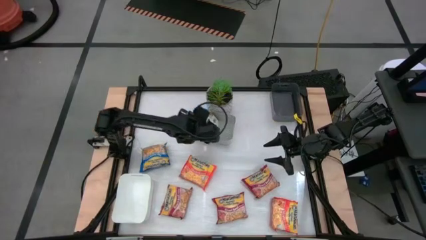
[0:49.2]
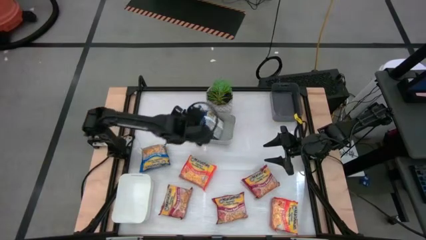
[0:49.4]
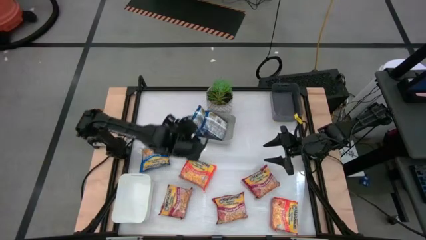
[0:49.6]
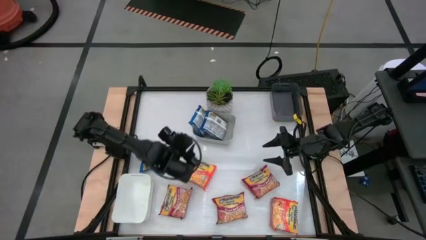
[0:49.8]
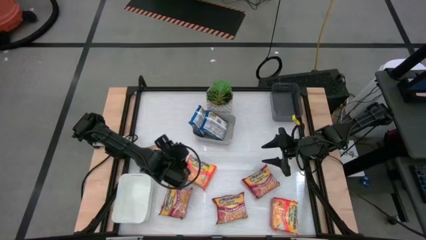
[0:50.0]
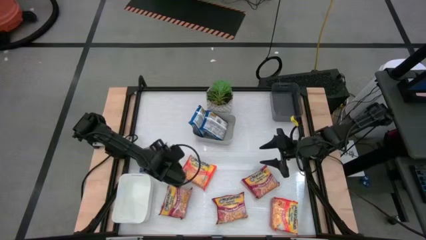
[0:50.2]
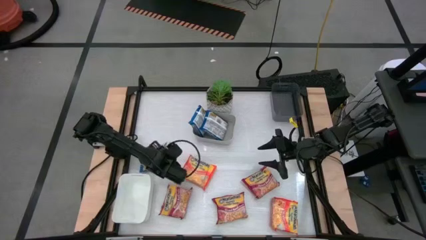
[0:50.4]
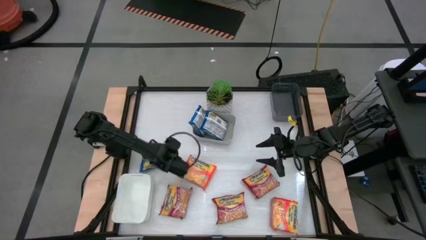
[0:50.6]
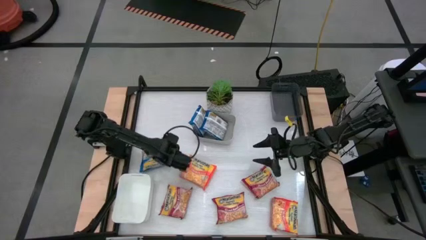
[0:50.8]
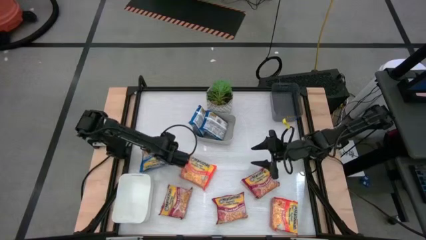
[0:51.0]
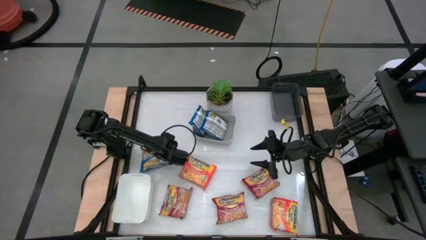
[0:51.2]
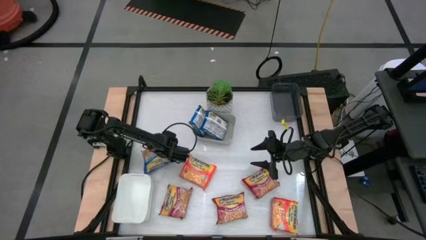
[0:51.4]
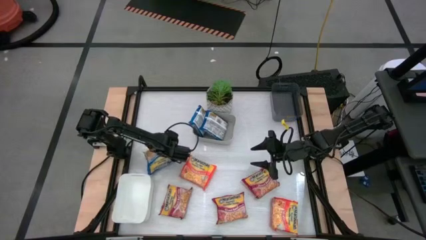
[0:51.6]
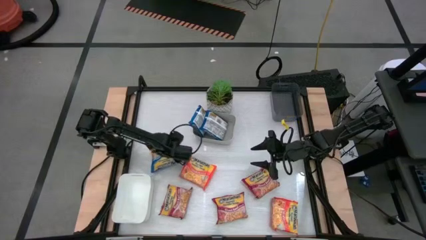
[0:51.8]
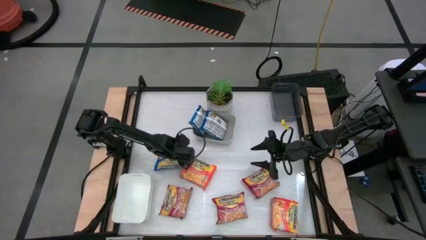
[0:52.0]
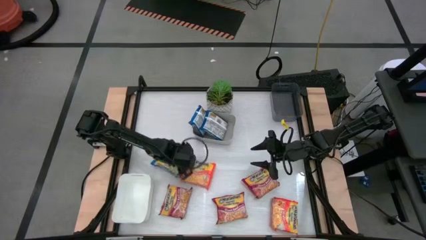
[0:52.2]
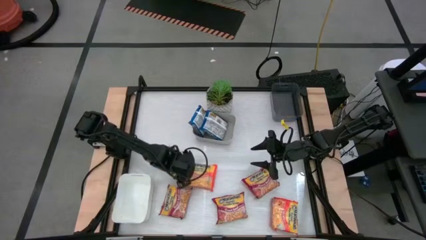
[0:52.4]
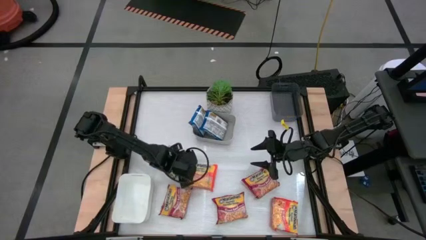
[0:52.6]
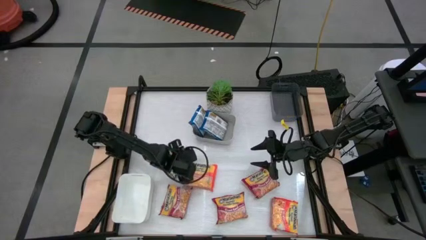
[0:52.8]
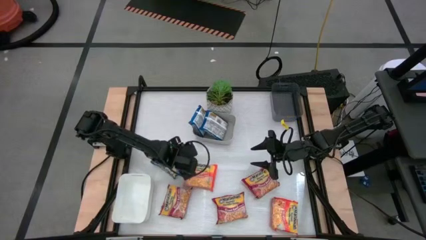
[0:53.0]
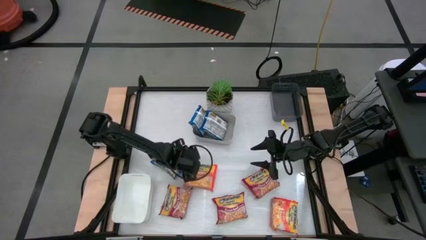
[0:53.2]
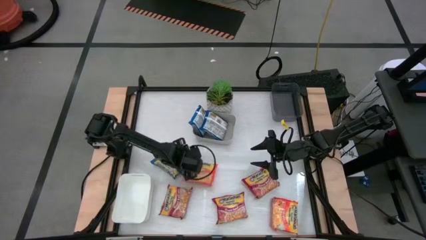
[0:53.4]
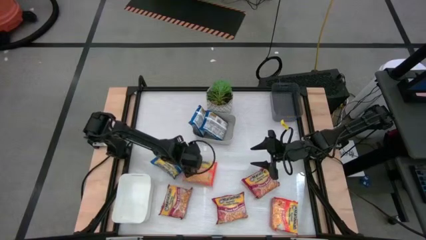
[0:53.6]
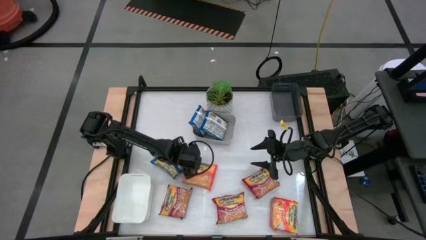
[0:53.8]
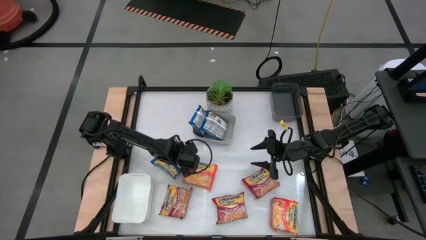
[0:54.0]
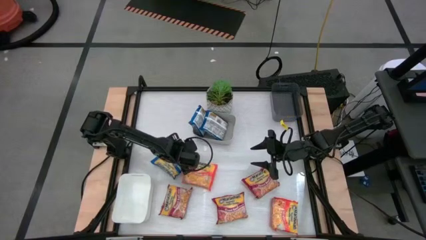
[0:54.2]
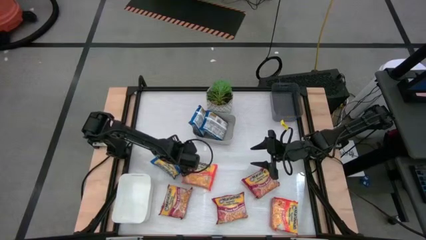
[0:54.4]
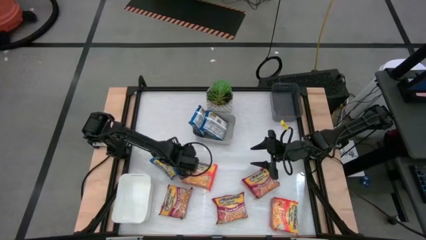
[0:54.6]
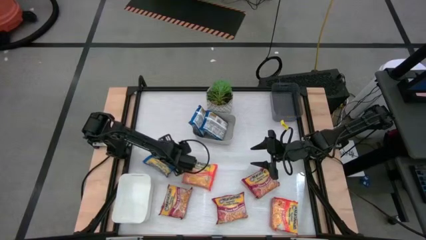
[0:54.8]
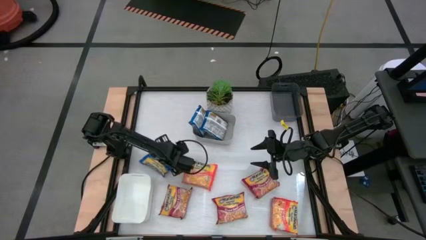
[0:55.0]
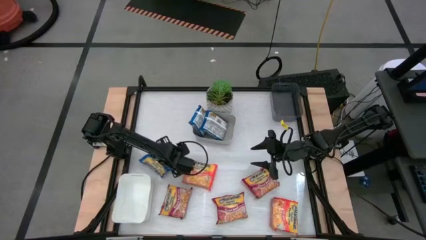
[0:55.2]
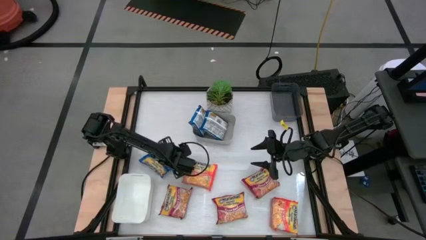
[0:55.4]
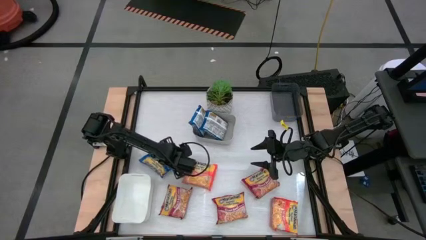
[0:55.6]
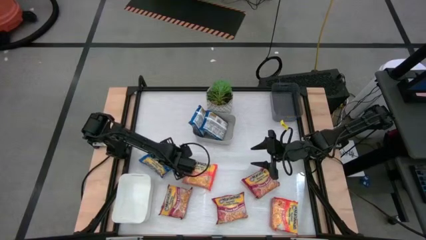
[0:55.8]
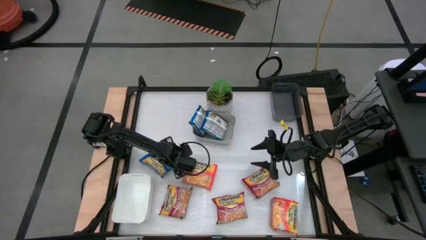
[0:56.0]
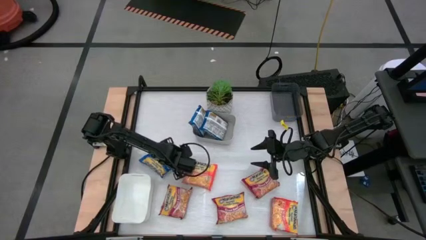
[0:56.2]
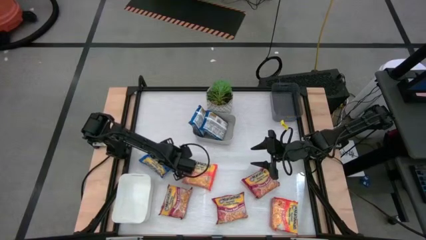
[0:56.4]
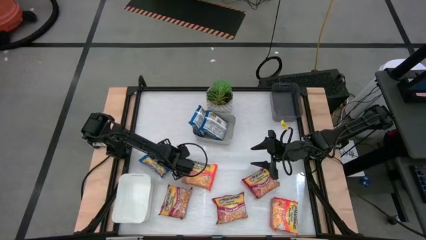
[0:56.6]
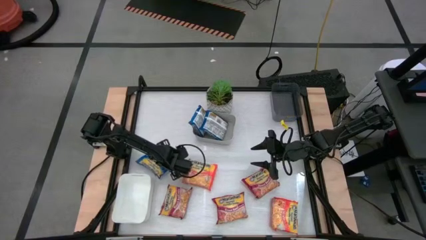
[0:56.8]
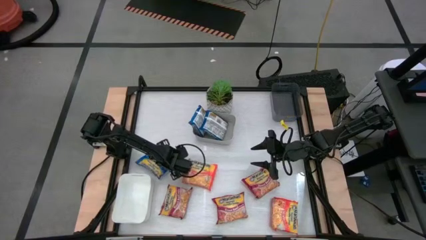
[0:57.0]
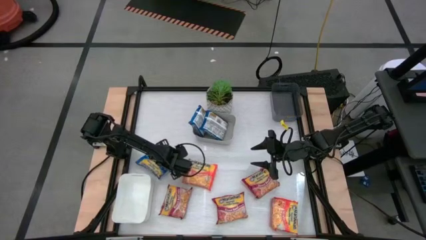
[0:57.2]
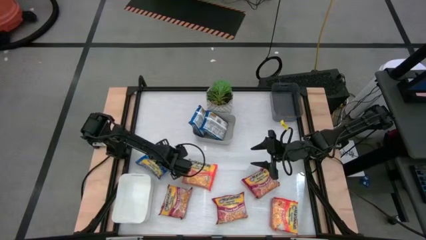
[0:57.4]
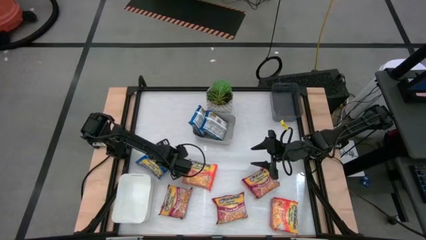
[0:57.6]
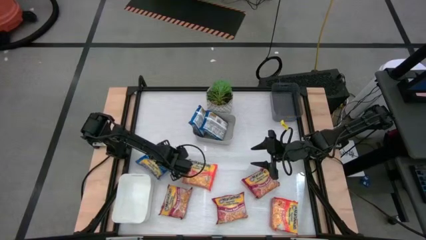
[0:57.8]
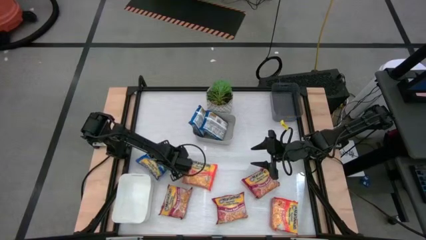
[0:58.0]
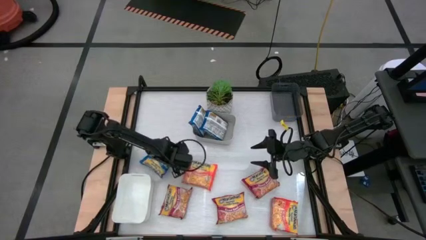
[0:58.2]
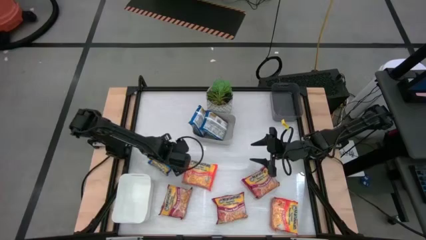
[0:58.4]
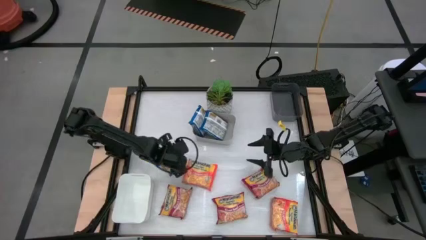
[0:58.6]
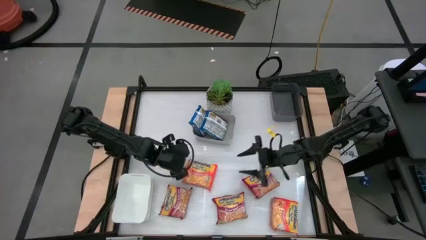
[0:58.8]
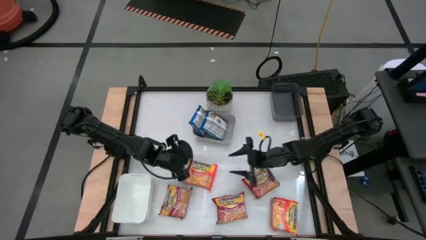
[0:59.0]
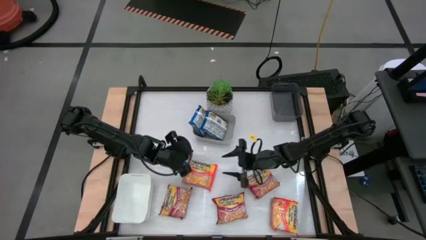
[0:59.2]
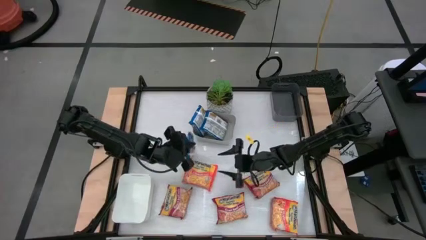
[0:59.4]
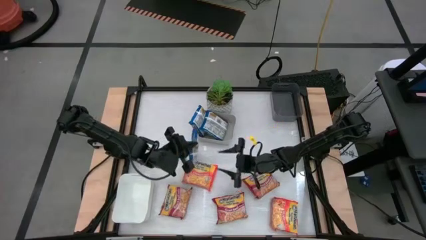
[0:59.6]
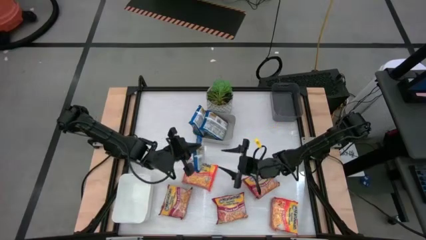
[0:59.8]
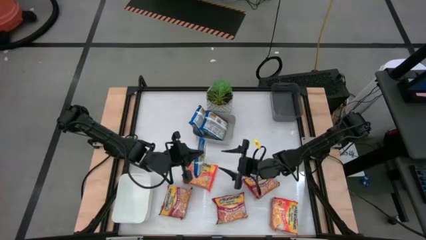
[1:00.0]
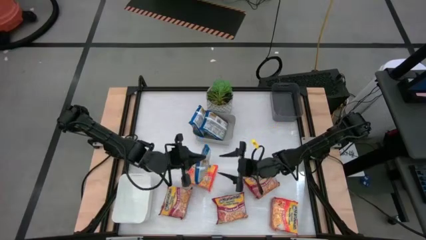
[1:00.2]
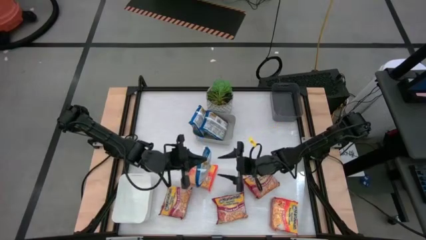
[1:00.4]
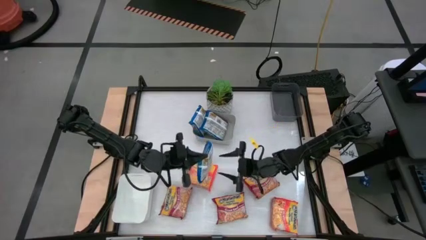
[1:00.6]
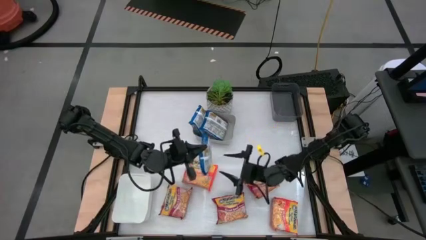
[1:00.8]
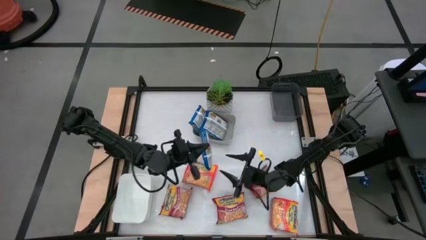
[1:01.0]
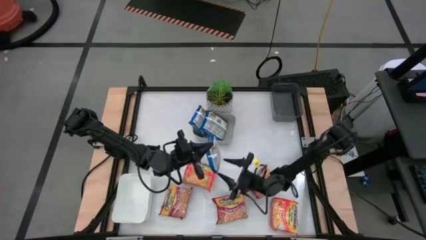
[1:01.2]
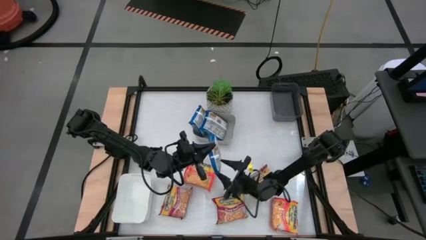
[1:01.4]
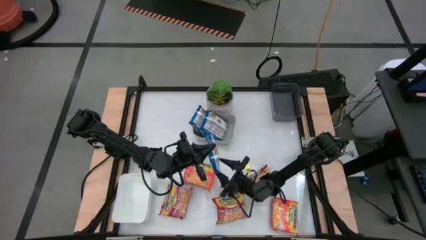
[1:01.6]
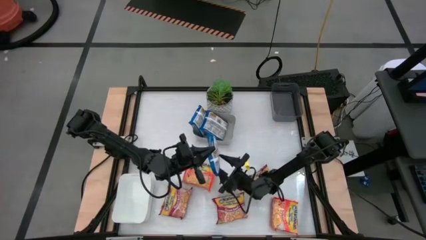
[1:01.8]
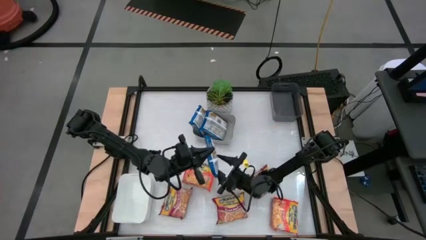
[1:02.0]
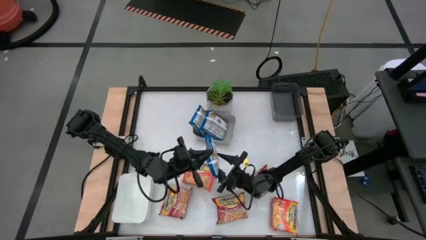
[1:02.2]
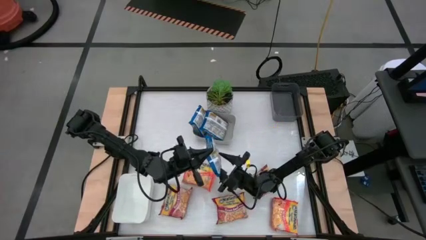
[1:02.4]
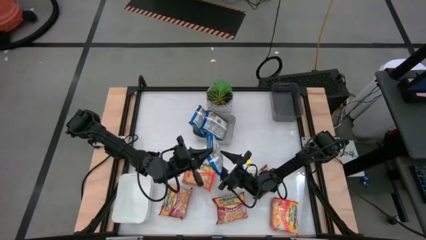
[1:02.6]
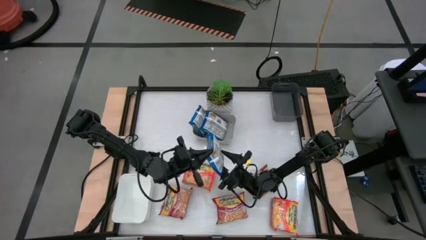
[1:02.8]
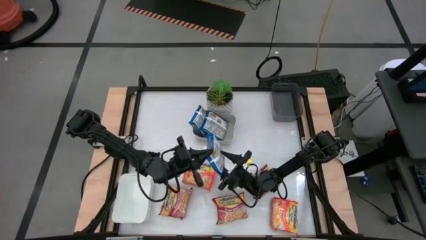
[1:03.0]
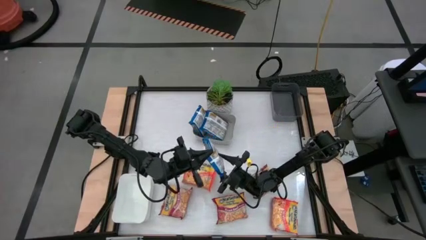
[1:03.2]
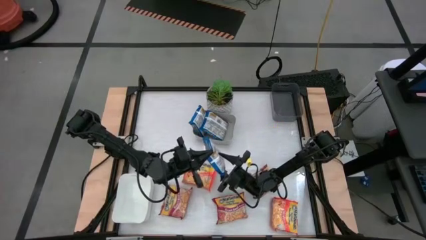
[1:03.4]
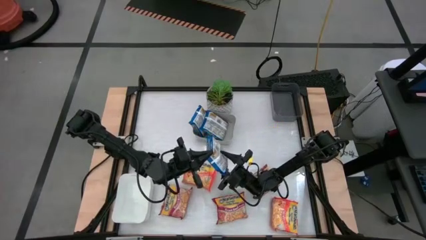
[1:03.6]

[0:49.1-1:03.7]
Task: Sort Maruchan noodles
Put the blue noodle pack into the gray bin
